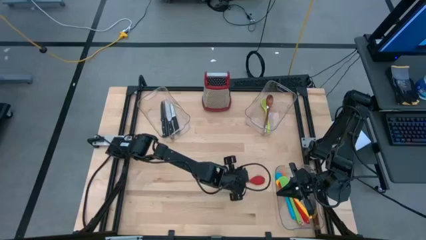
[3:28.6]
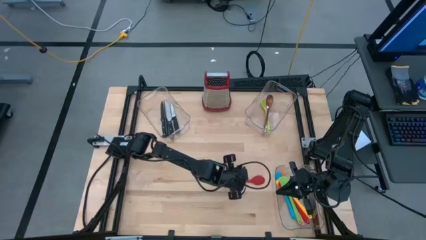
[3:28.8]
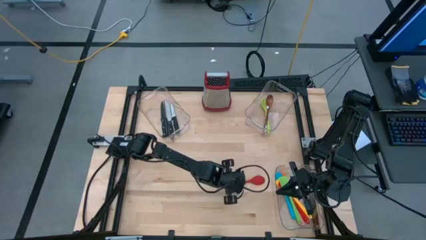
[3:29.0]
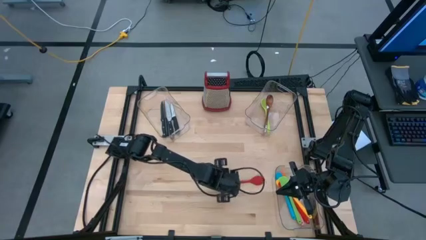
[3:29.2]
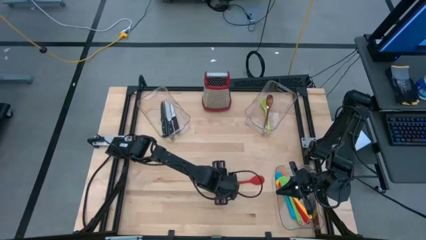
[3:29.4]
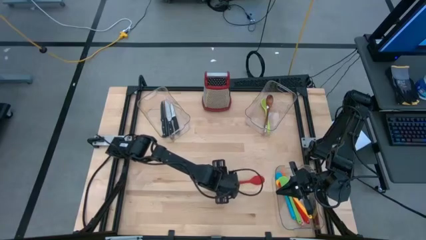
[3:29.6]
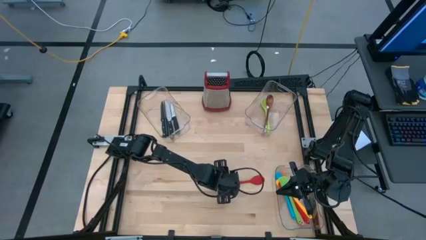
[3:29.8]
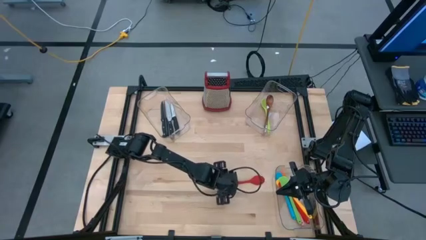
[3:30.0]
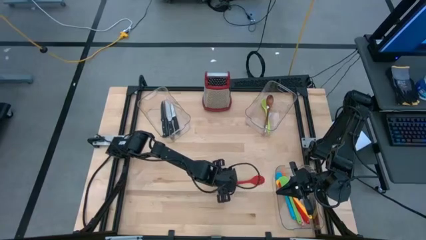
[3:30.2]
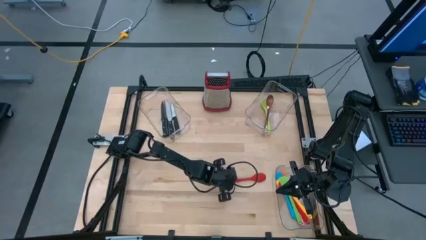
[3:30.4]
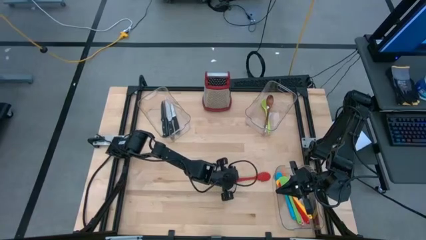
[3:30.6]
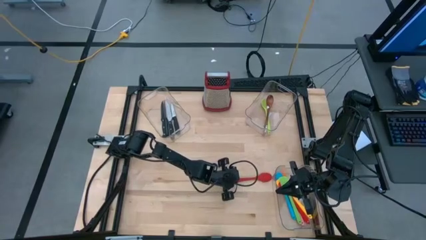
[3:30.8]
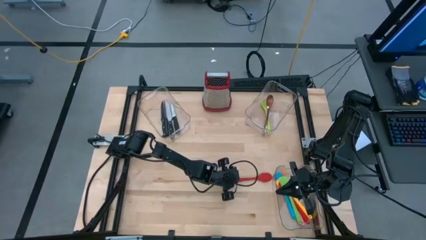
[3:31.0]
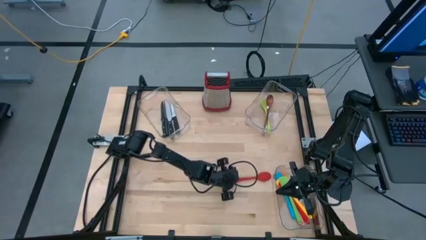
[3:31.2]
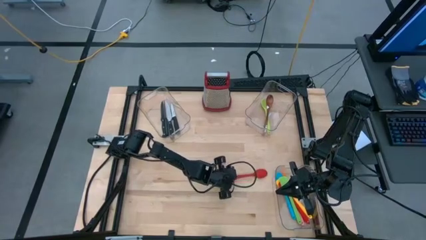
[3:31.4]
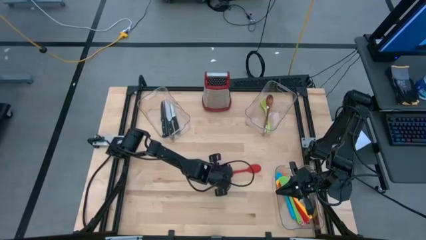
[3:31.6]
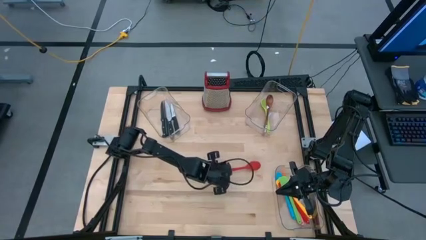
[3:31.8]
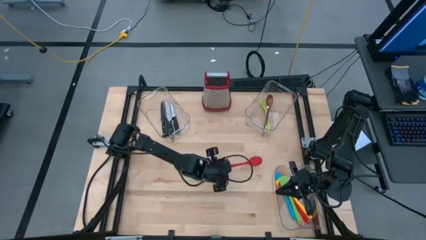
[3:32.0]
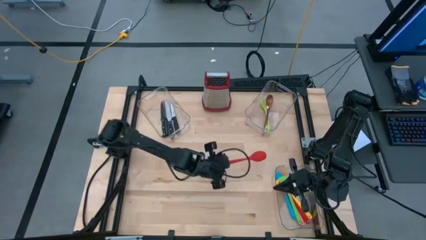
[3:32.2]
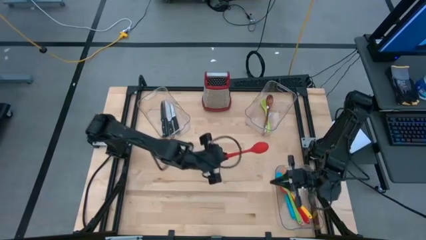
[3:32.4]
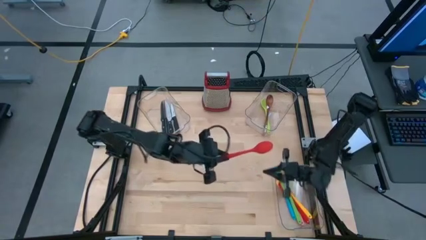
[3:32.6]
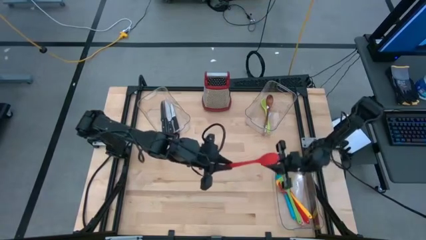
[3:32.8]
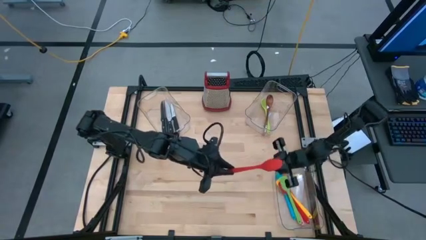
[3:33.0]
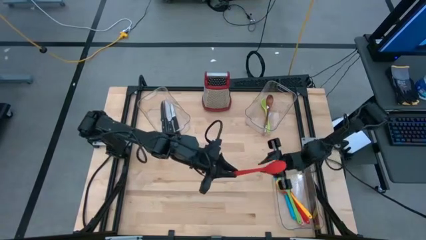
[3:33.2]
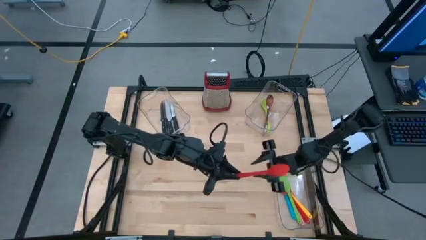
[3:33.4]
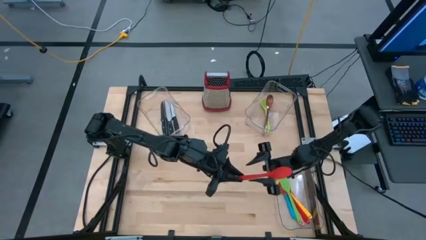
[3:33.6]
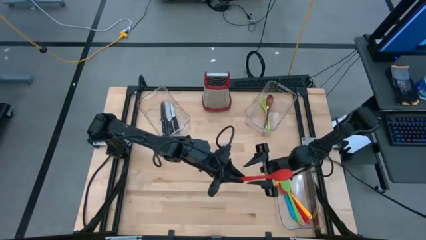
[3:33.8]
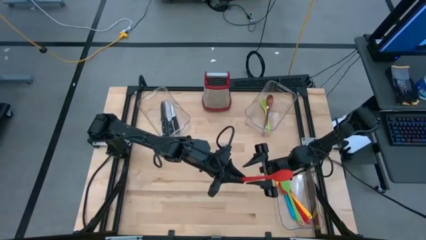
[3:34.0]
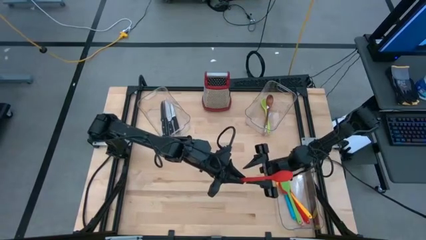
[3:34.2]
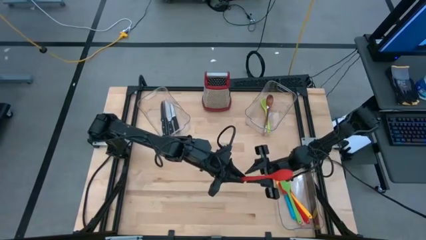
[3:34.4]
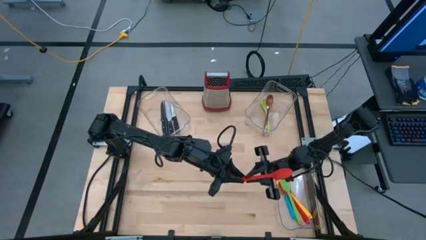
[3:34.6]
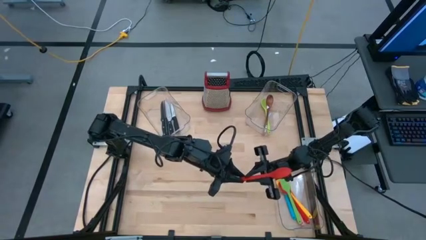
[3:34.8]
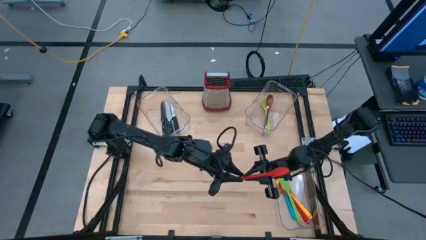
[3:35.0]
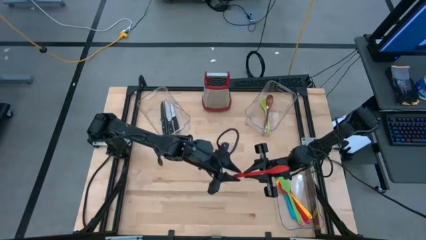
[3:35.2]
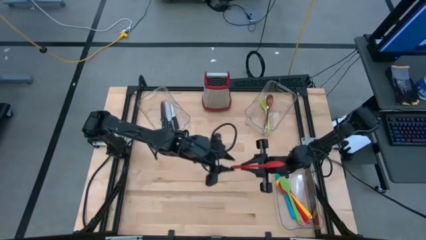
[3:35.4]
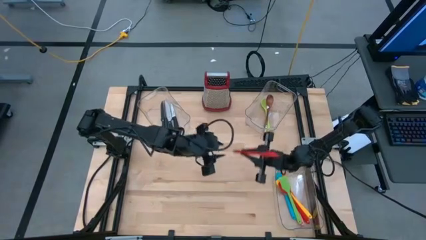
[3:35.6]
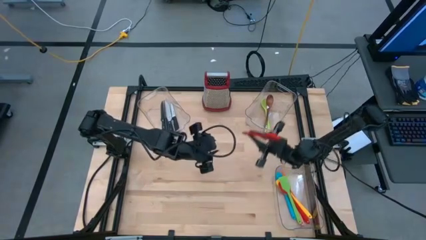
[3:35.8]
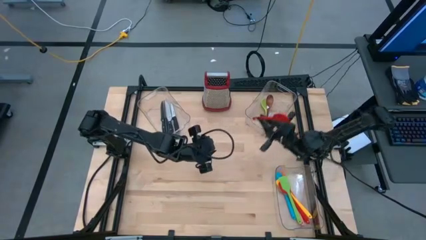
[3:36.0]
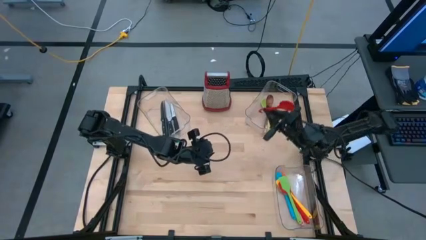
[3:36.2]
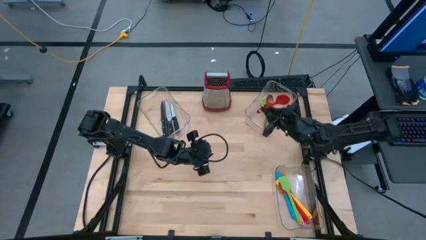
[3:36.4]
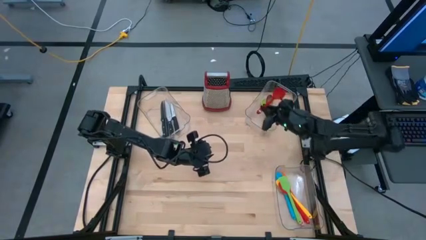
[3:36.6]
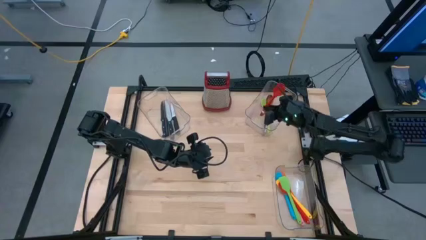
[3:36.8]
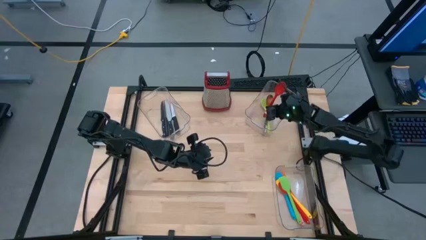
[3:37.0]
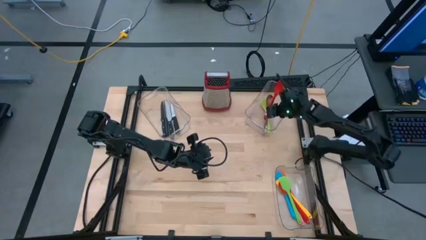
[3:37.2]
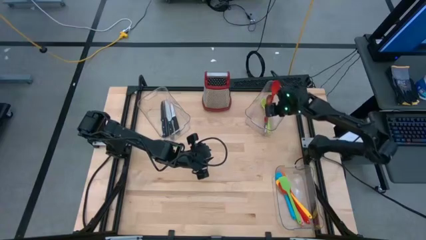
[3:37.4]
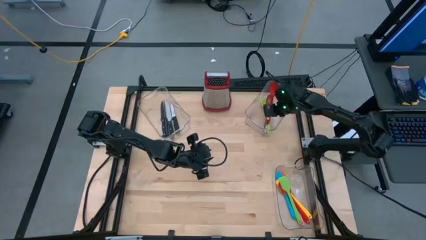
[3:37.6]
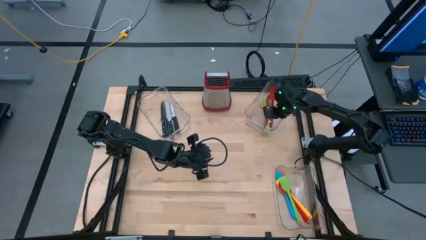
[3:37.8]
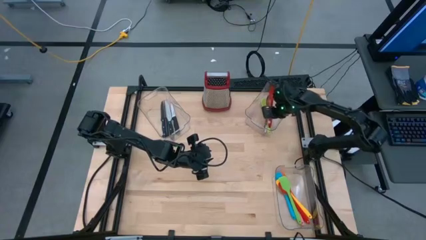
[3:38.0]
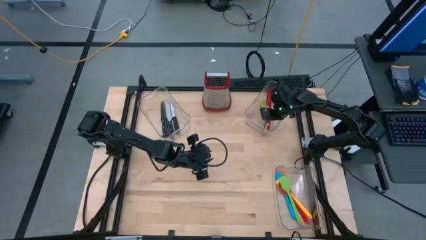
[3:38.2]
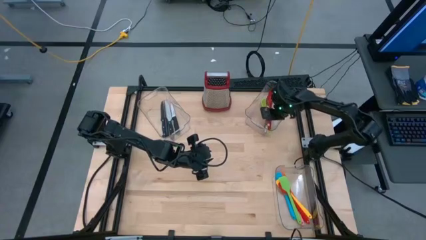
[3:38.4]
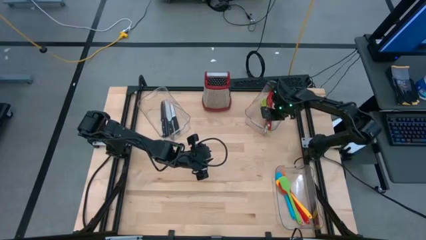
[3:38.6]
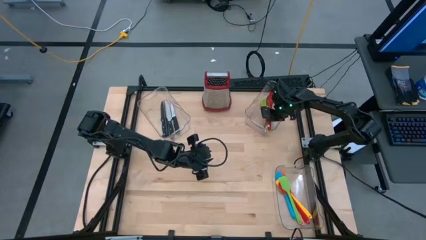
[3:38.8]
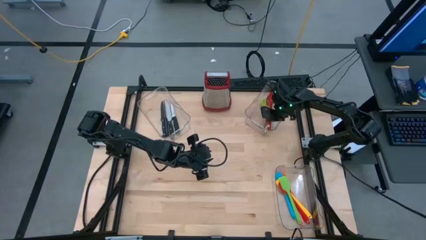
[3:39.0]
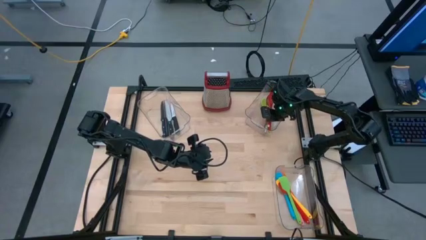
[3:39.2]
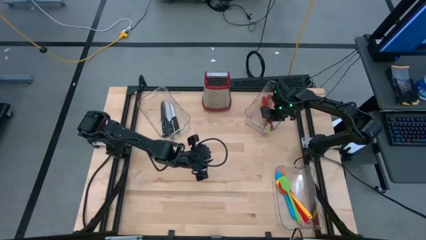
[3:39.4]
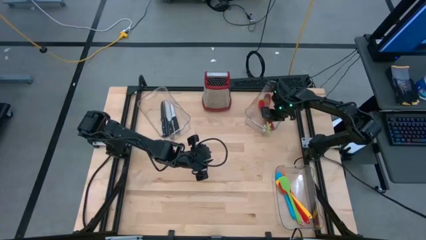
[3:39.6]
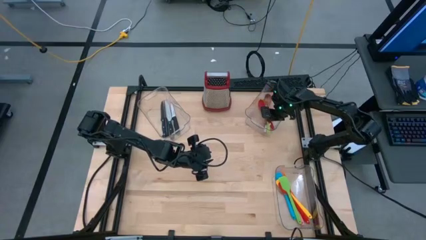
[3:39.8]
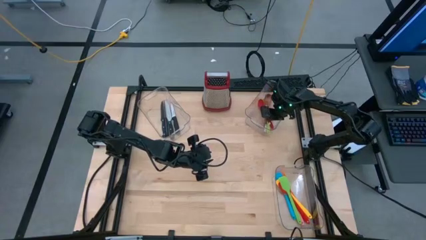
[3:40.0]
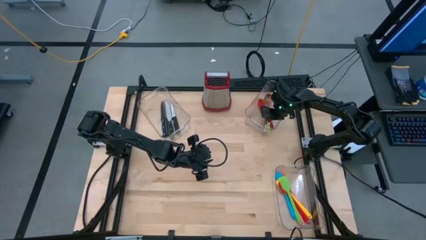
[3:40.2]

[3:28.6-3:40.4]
Task: Pick & Place Kitchen Items
Put the red serving spoon into the top right transparent bin
